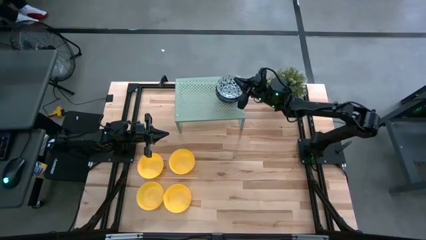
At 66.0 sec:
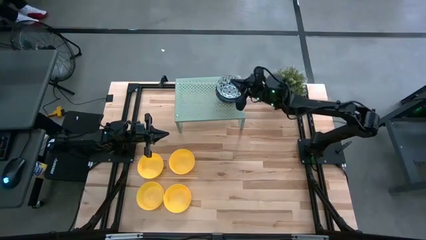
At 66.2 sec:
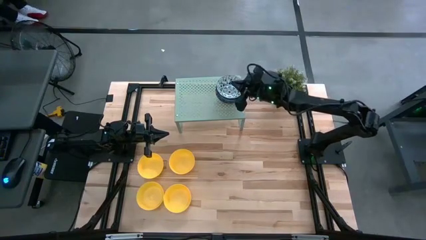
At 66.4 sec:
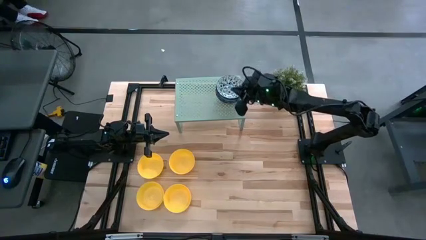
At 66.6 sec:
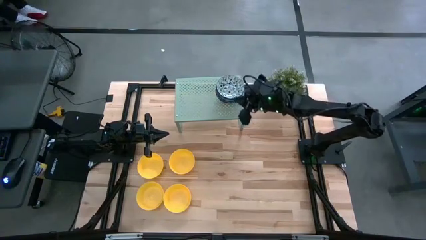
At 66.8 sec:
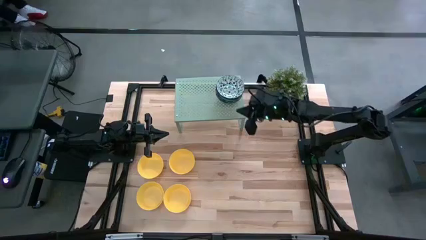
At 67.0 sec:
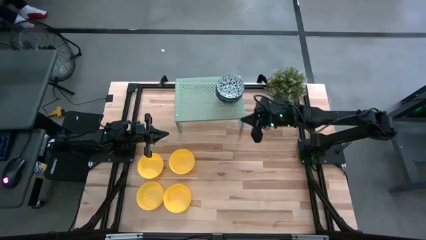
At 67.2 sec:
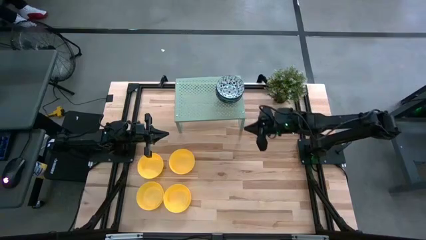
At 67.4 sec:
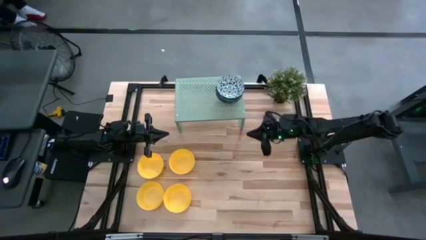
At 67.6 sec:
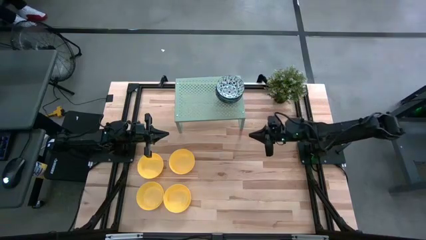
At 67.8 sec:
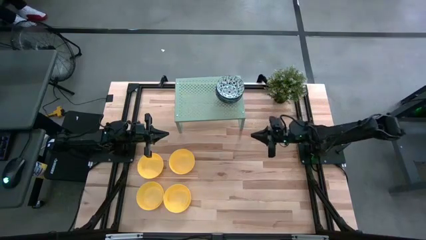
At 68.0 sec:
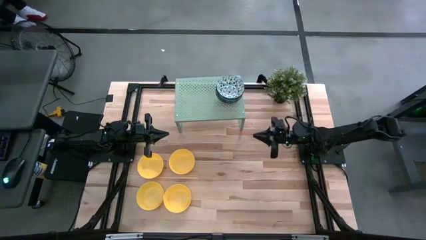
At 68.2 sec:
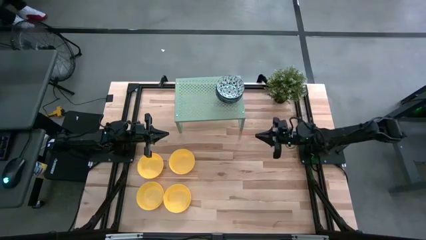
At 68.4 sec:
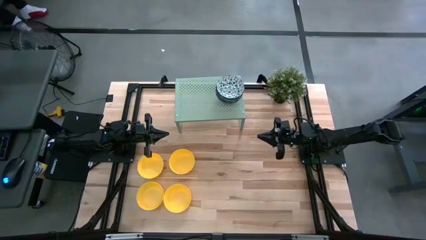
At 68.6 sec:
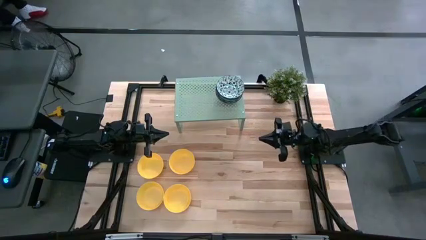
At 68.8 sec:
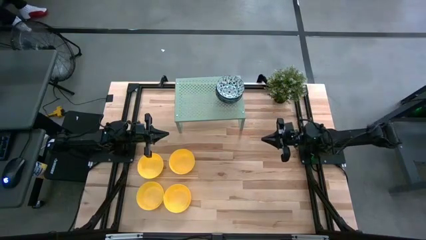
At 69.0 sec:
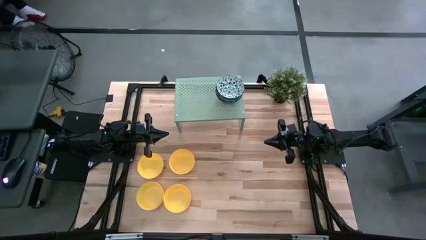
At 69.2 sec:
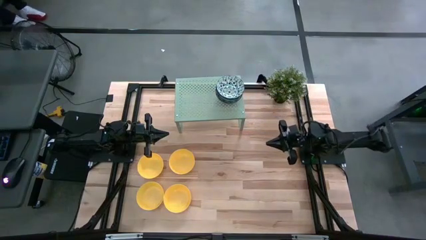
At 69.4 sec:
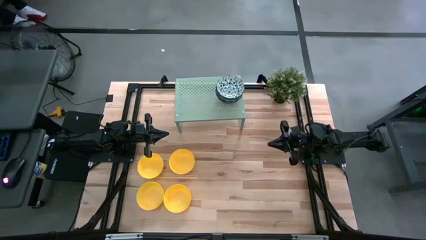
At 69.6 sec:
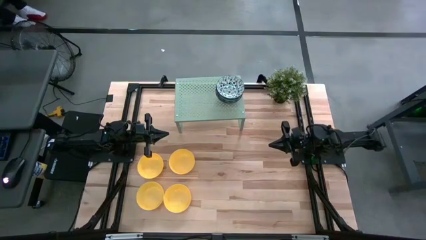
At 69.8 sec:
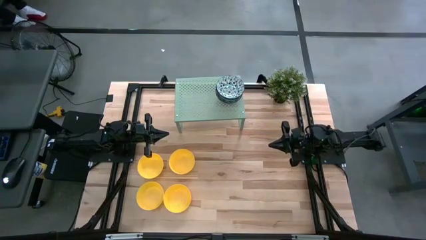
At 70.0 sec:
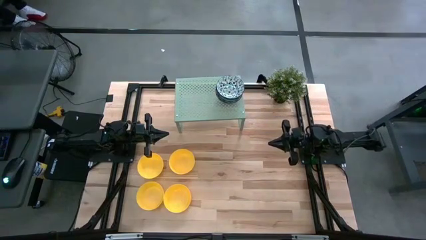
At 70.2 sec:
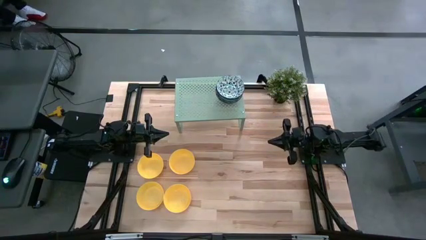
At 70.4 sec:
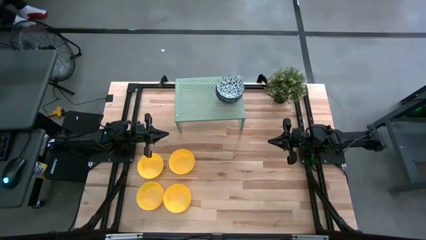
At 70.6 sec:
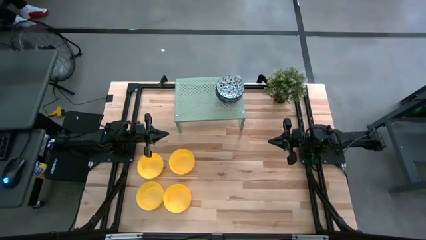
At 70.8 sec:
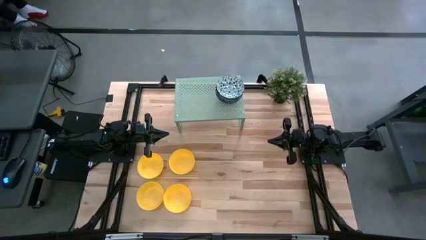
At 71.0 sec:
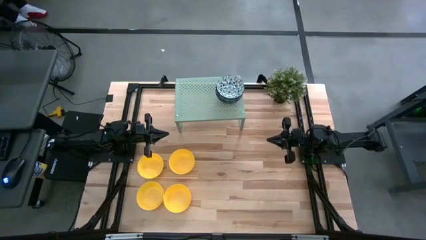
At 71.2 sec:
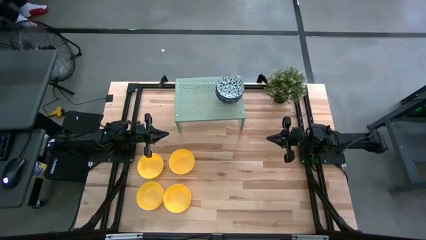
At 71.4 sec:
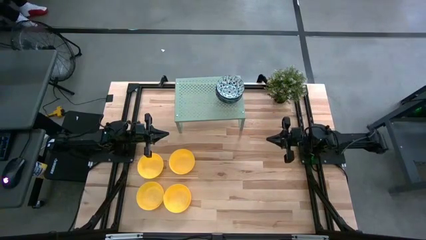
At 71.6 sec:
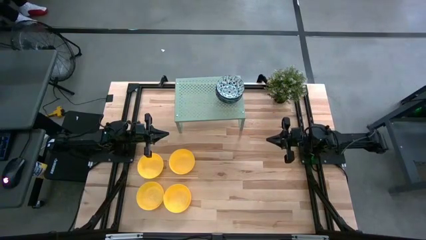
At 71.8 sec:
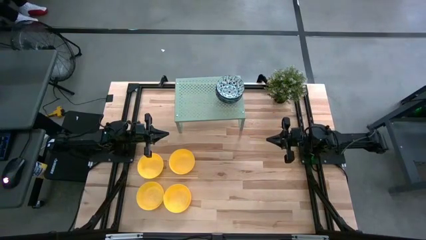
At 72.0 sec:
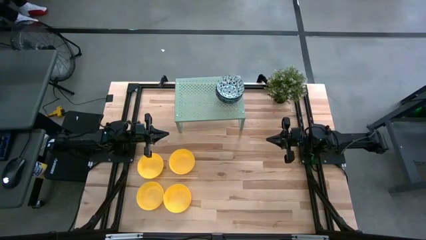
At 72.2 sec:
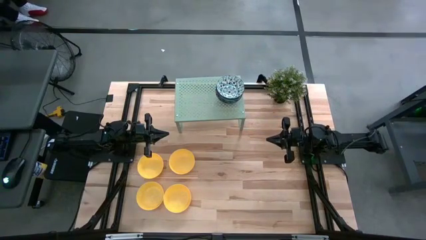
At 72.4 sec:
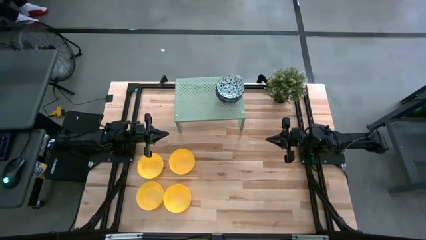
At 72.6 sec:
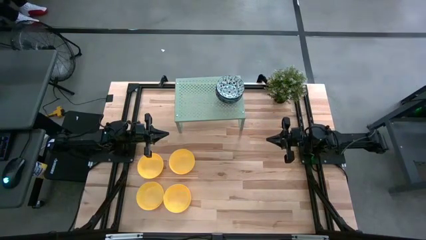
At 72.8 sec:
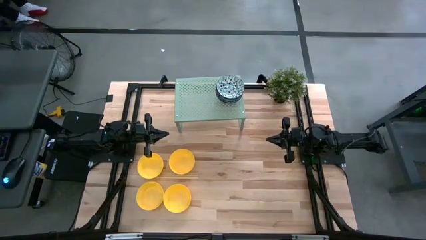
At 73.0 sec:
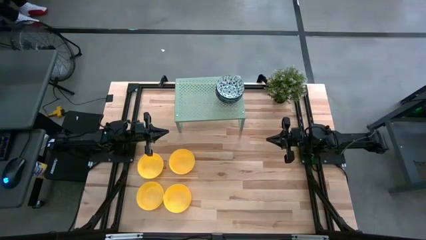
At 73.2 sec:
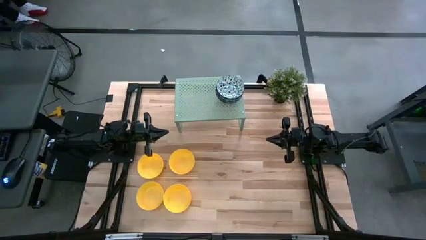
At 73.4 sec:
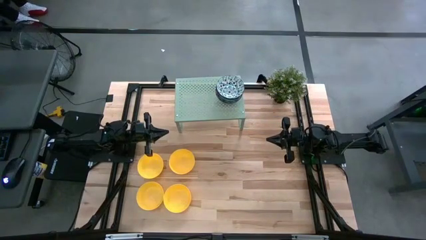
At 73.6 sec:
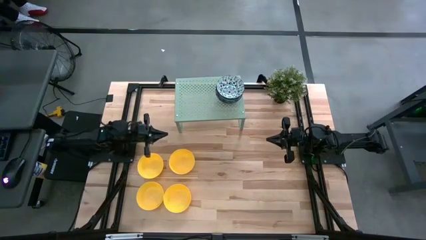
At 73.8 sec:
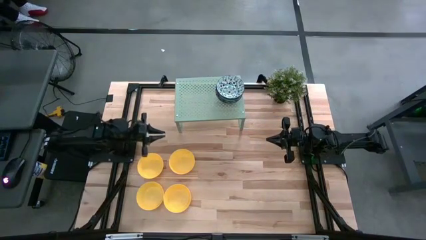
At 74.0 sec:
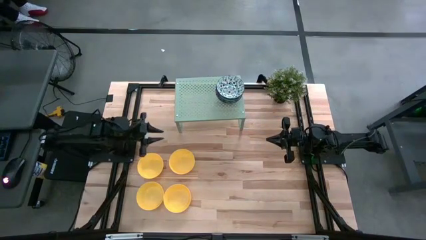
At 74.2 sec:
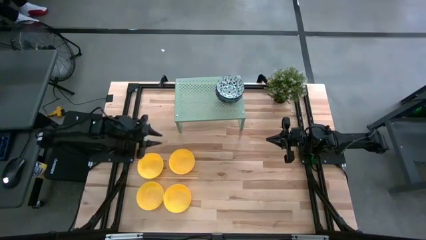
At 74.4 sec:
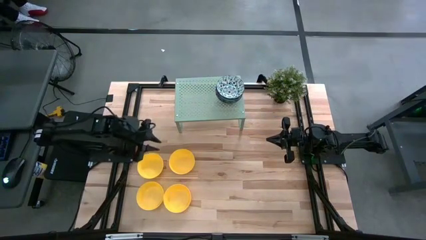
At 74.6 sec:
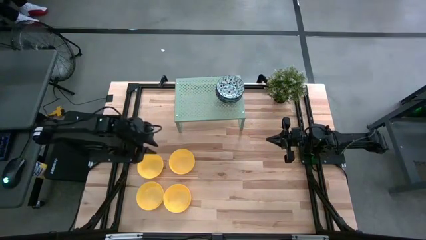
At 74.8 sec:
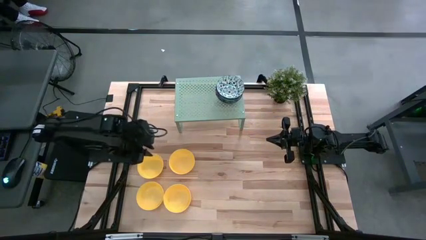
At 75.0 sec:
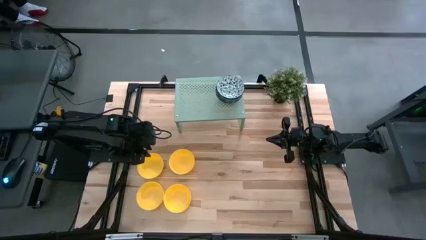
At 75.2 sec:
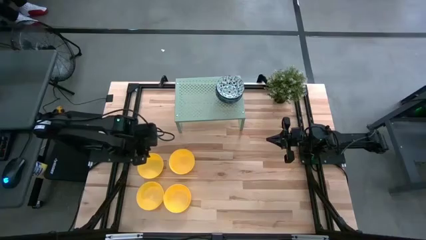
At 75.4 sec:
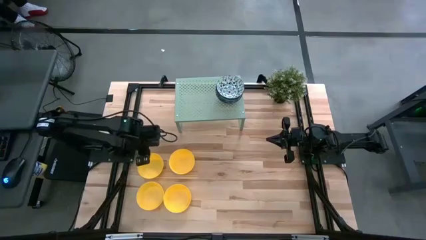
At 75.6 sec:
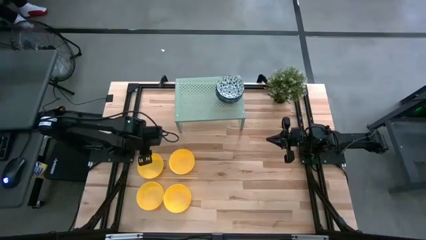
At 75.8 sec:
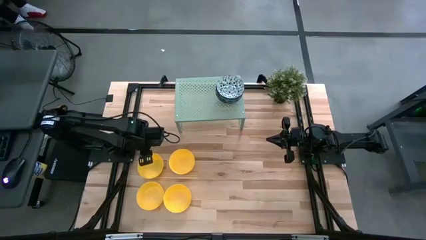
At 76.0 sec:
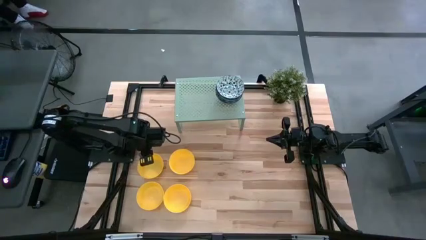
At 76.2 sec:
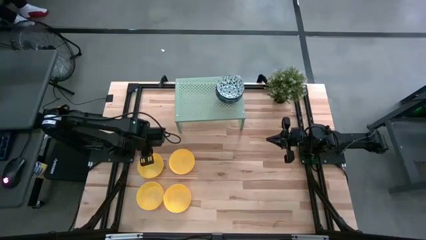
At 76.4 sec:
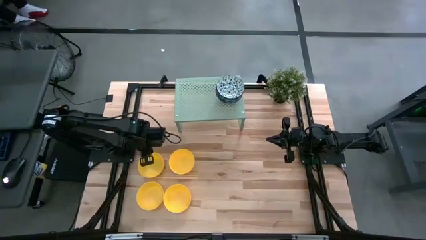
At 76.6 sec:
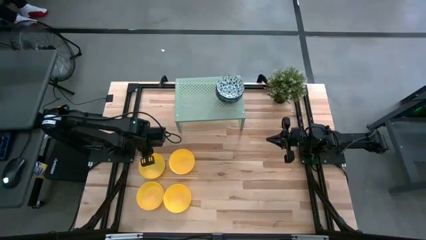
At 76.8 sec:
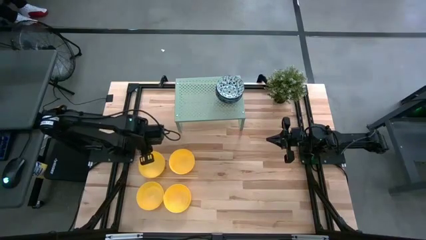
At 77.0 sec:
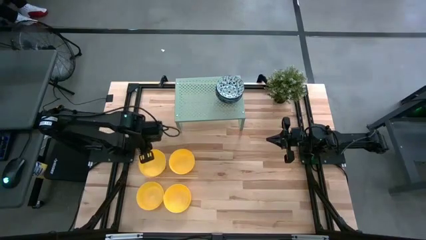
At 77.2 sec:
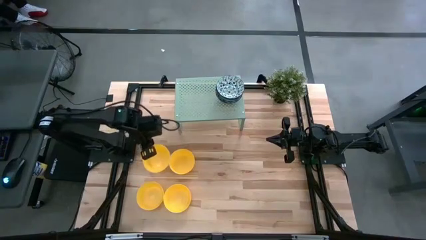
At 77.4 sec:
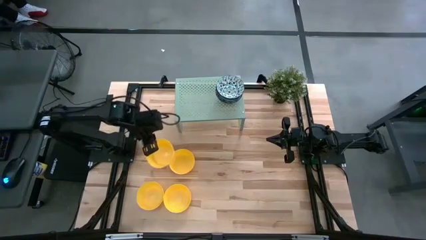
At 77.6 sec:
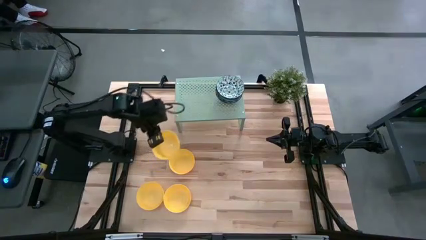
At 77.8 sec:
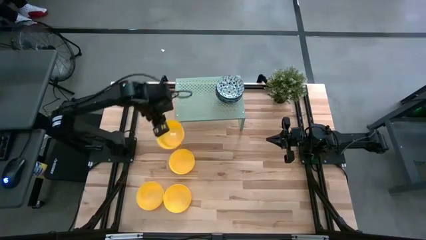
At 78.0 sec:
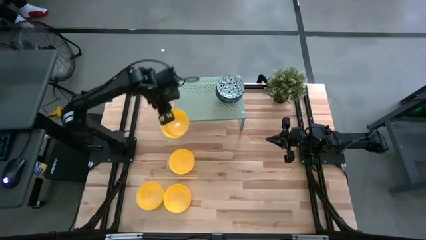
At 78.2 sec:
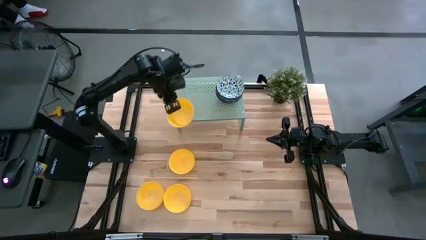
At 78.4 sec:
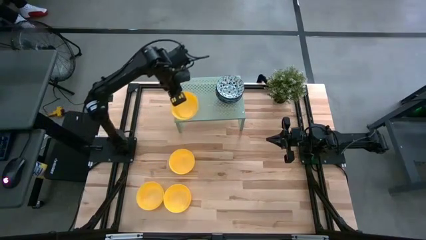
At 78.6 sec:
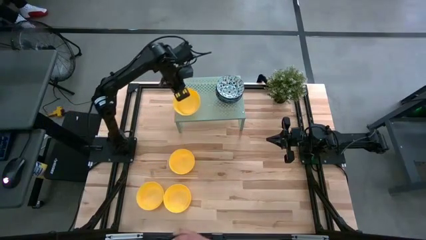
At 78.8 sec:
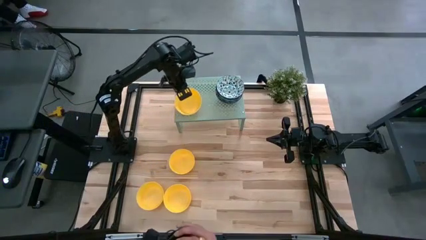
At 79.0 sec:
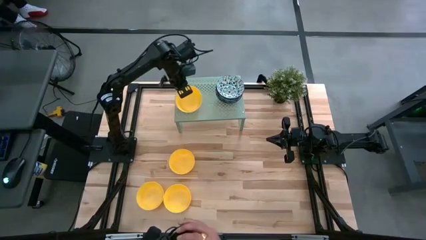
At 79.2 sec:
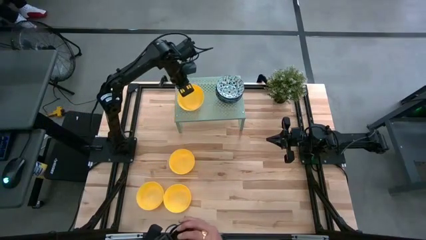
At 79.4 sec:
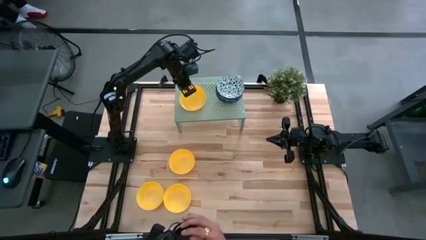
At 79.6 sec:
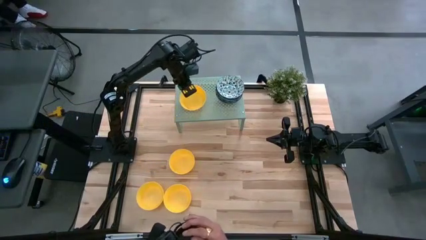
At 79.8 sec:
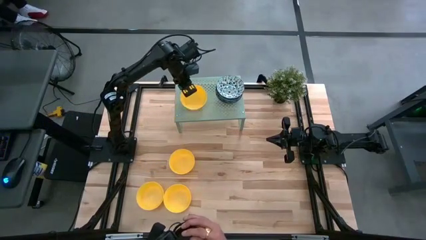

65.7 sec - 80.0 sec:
Task: Pick & Place Mini bowls
Put the yellow bowl on the shelf
